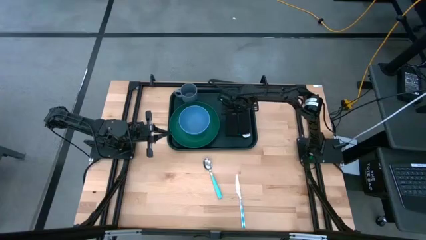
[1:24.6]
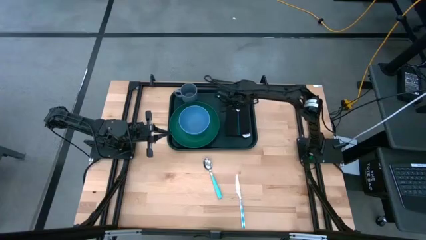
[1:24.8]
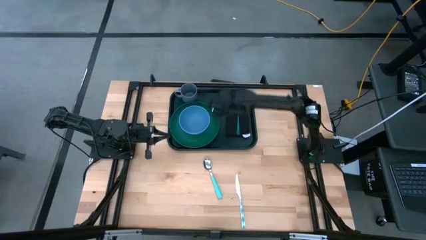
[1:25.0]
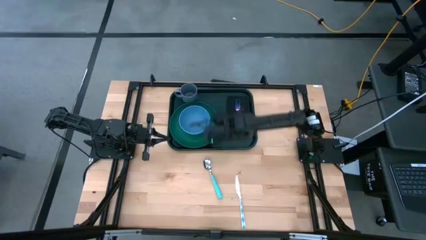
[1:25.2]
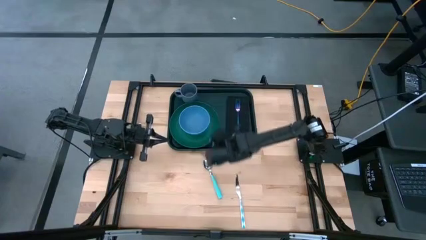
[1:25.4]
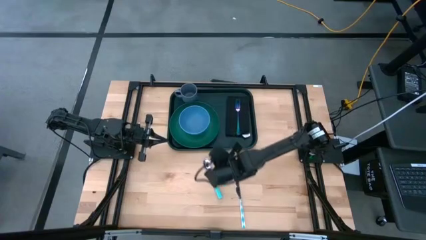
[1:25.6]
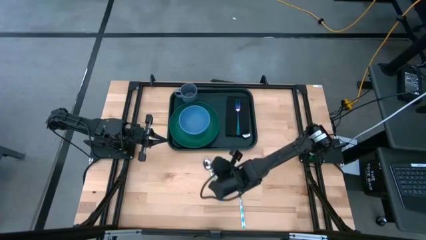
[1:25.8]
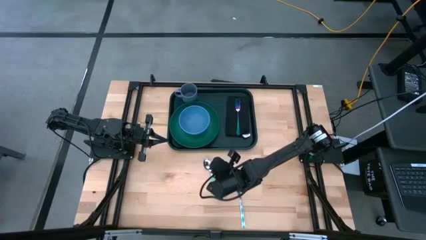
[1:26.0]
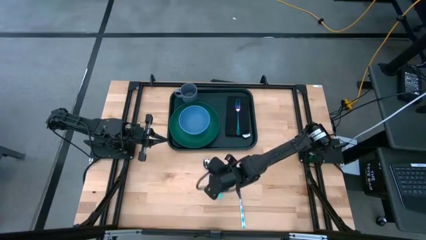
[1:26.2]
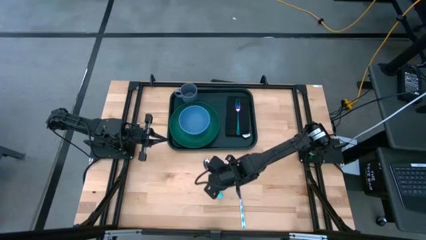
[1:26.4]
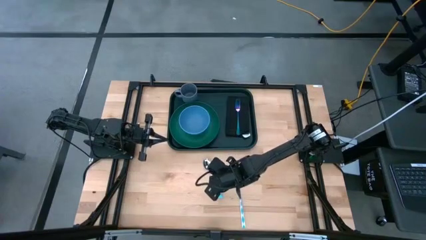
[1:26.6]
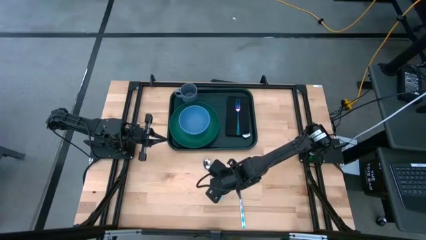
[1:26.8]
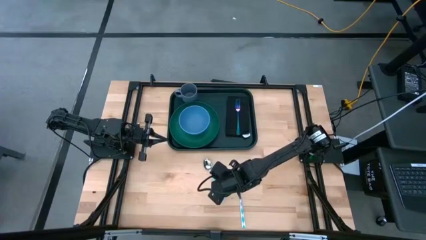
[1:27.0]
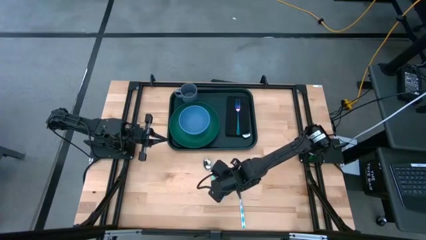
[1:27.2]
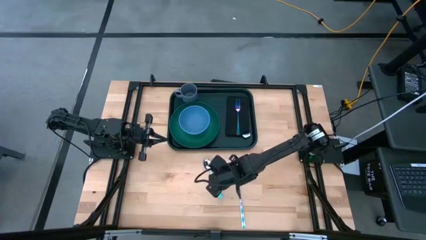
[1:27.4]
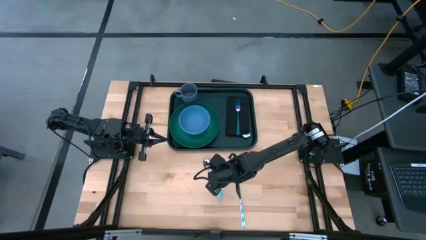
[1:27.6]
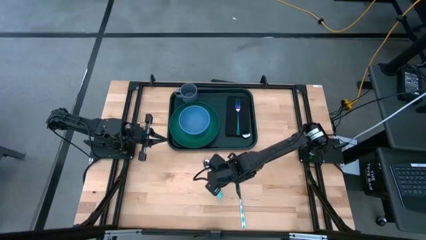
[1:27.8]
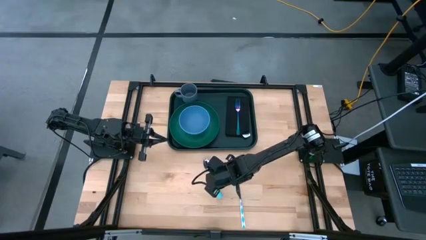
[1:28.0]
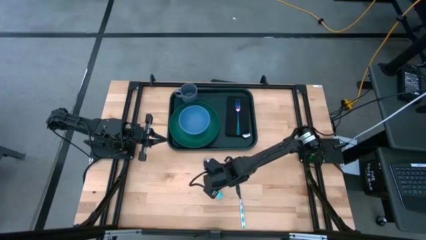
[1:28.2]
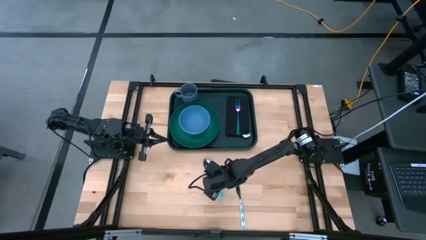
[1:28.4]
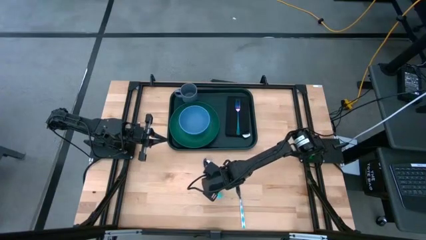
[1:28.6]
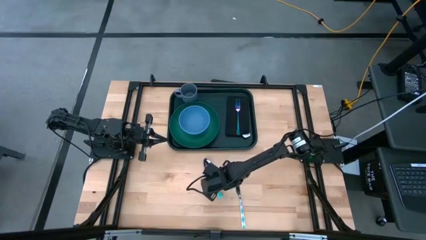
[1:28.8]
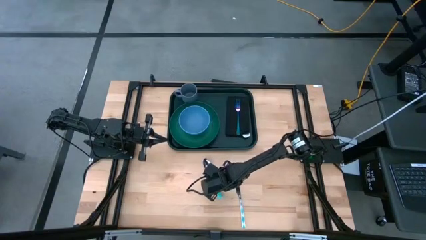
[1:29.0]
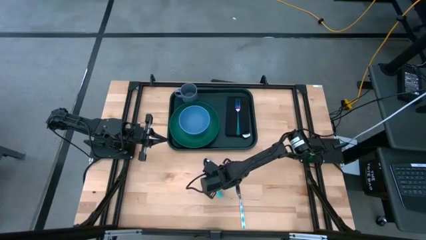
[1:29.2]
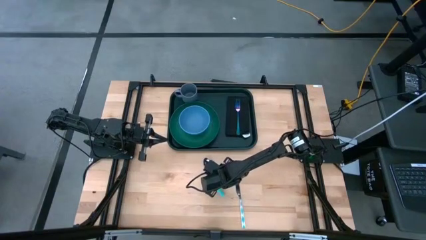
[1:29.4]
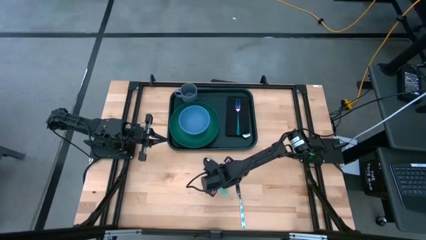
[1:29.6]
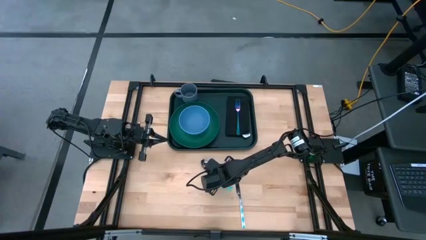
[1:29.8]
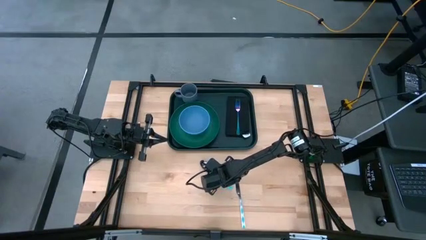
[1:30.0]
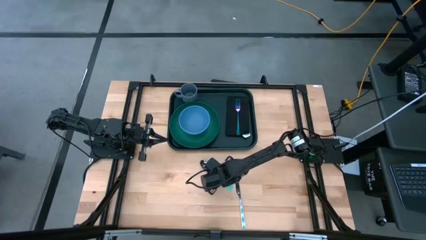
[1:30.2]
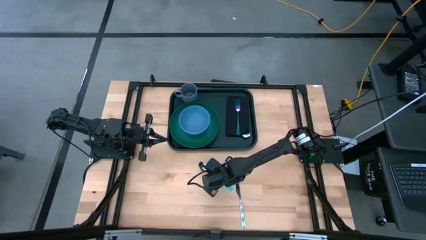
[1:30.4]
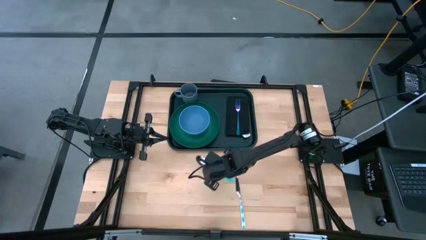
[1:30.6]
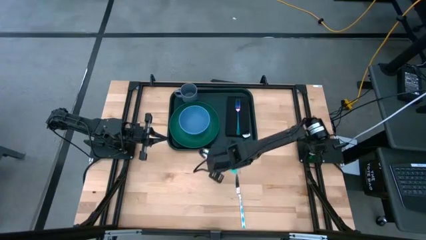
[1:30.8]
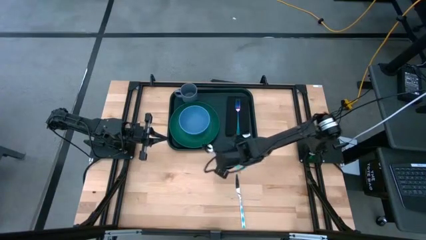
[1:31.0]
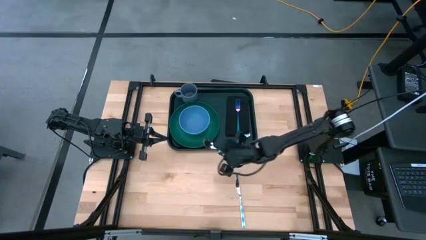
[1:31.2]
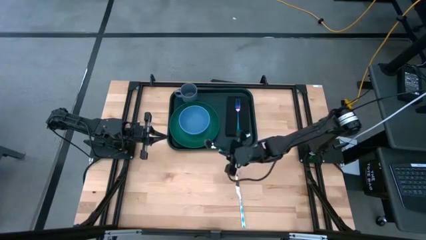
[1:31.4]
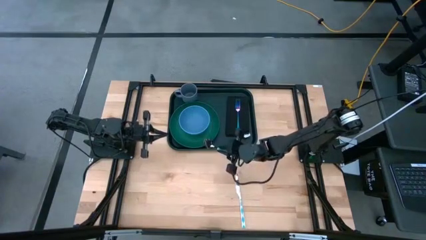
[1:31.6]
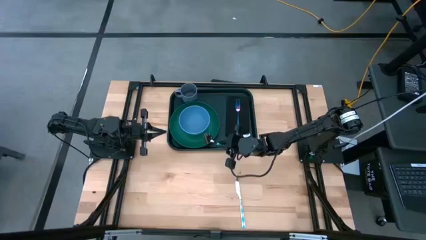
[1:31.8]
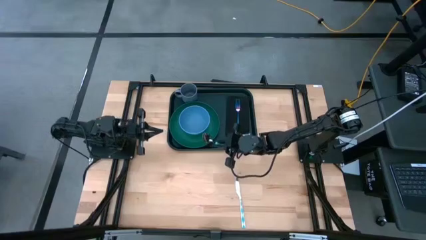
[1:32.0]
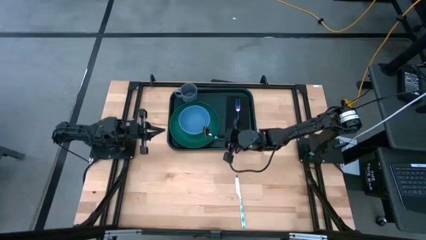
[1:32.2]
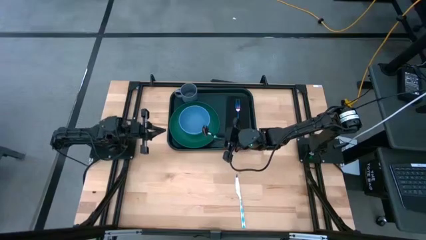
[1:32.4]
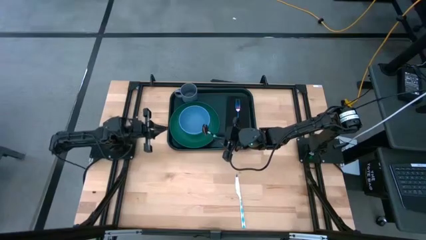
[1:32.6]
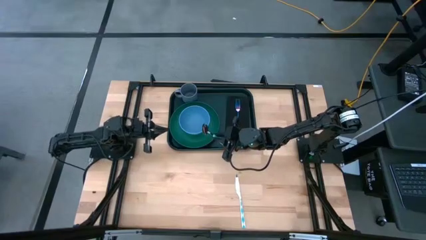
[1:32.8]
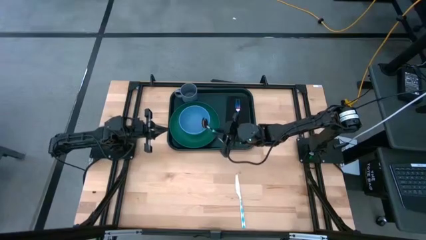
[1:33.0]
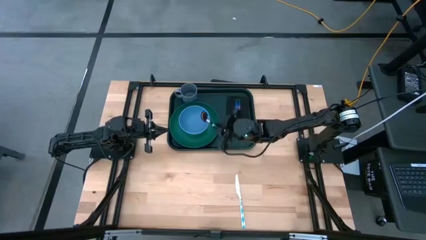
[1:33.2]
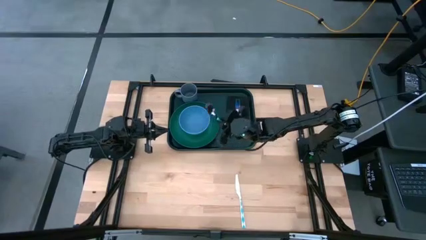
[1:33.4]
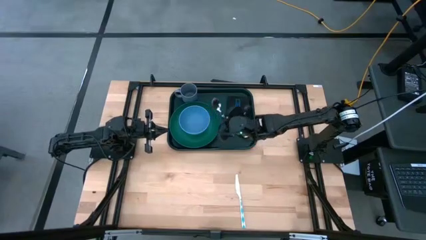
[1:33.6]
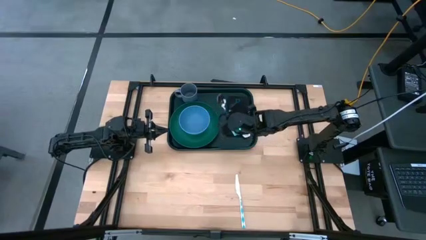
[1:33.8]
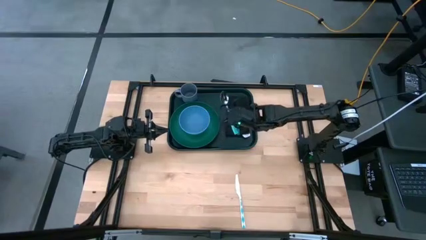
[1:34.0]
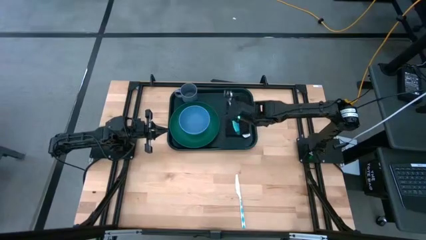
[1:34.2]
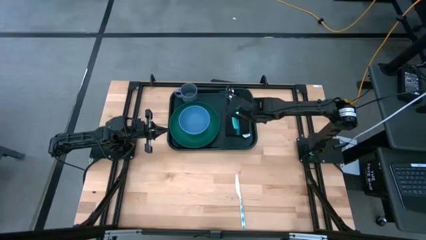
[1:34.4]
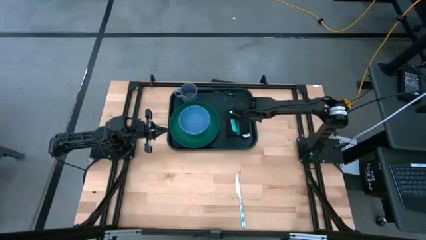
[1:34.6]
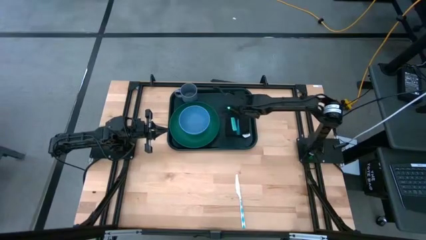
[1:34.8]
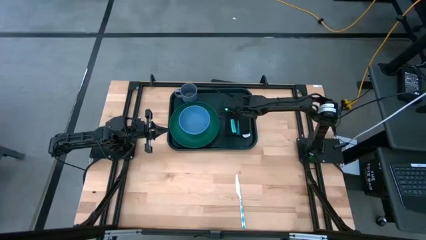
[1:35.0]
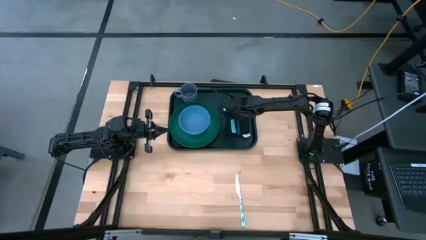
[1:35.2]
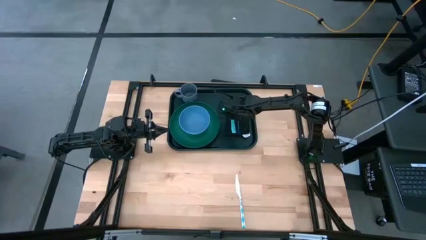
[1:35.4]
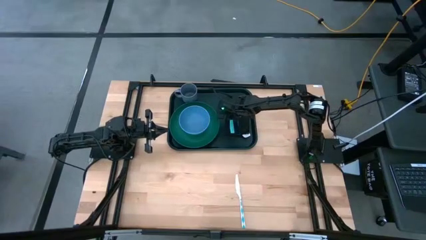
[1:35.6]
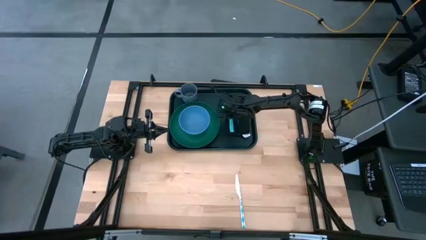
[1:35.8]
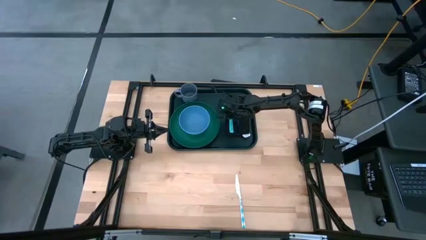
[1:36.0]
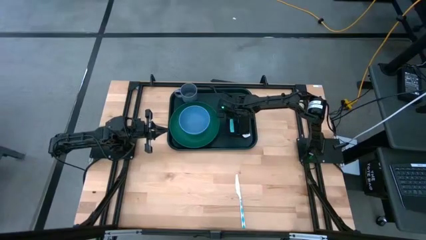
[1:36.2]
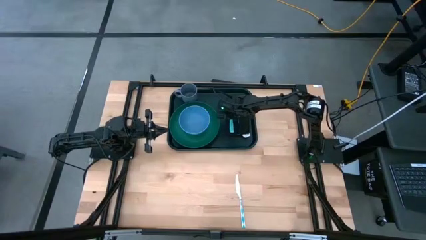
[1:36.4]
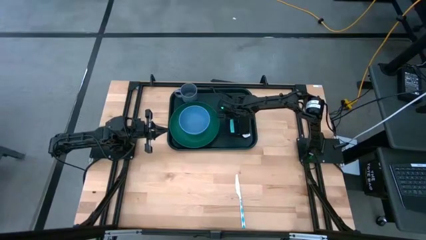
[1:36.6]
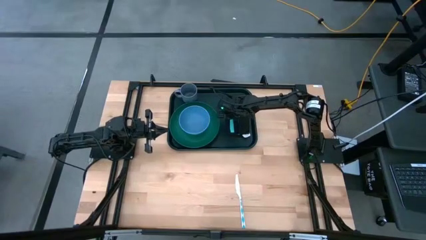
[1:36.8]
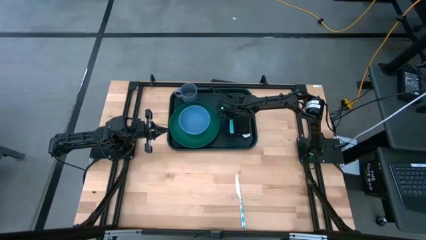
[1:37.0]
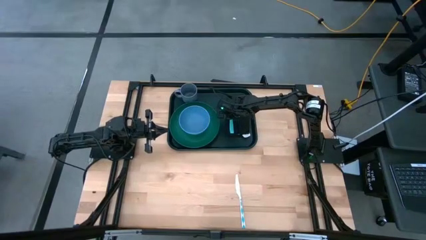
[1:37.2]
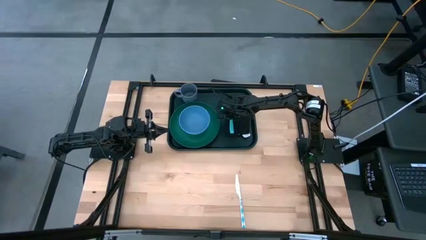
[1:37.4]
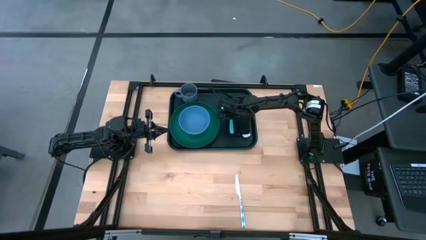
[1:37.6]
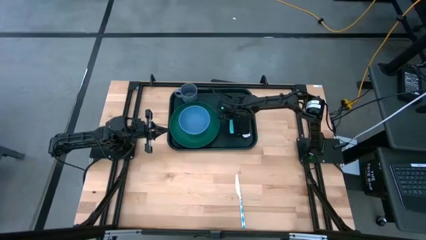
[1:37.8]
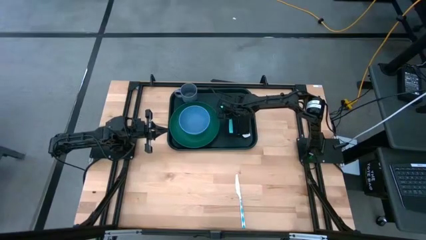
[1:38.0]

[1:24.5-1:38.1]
Task: Set up tray
Put the light blue spoon to the left of the blue fork on the black napkin

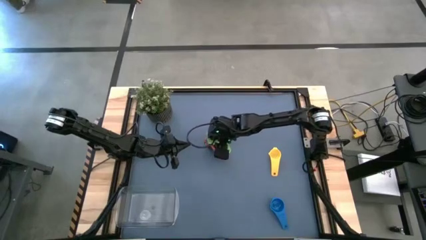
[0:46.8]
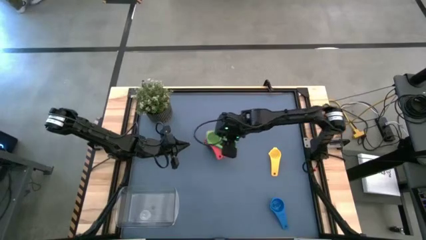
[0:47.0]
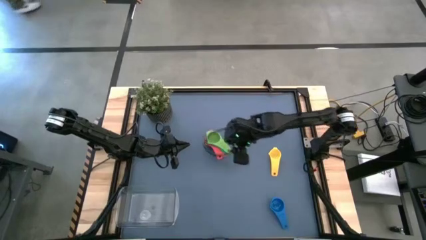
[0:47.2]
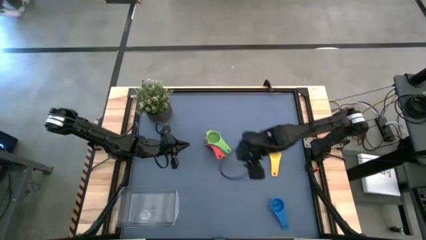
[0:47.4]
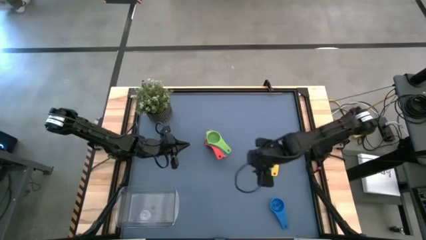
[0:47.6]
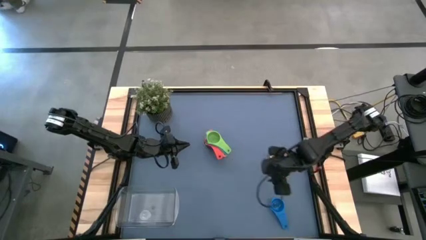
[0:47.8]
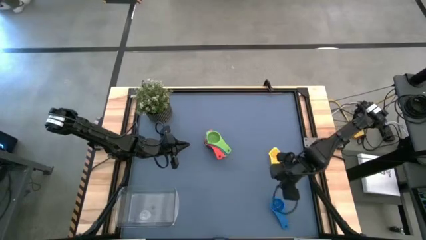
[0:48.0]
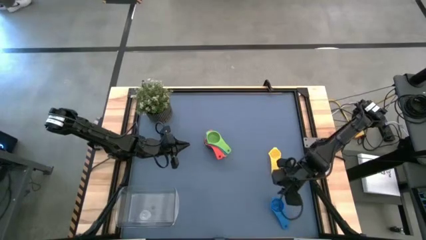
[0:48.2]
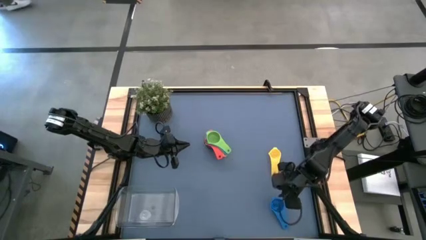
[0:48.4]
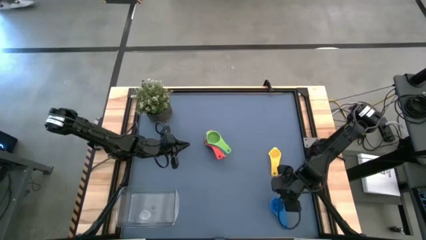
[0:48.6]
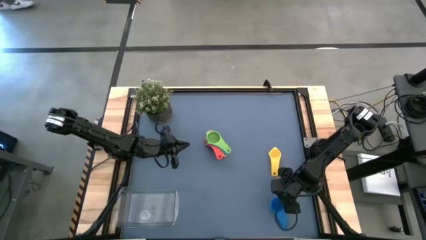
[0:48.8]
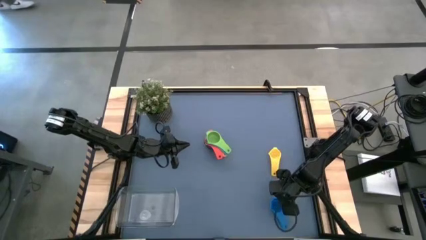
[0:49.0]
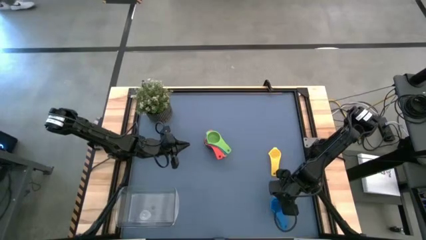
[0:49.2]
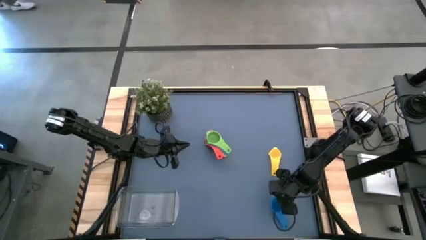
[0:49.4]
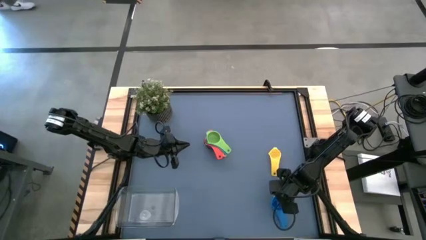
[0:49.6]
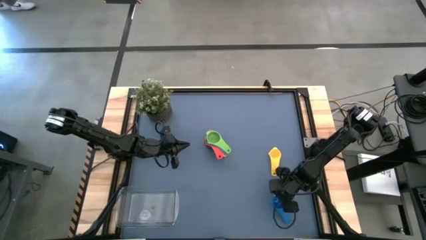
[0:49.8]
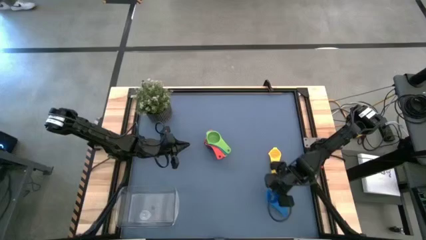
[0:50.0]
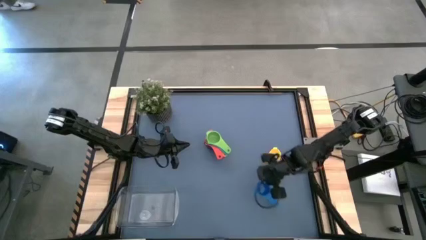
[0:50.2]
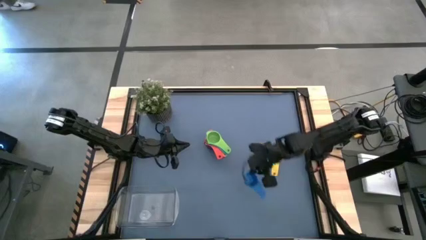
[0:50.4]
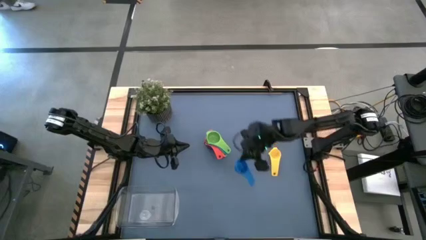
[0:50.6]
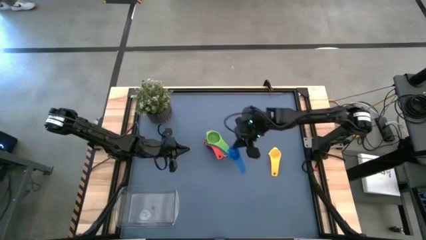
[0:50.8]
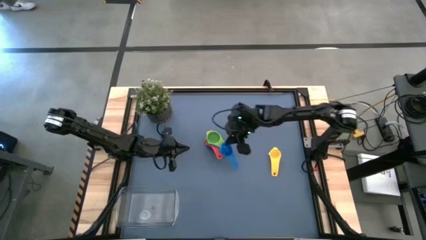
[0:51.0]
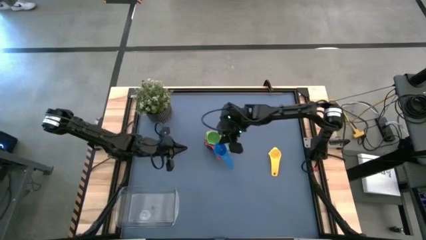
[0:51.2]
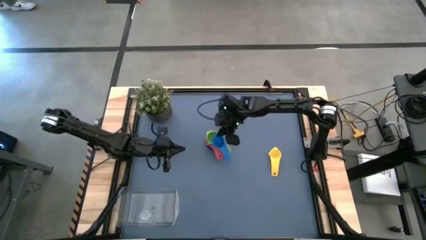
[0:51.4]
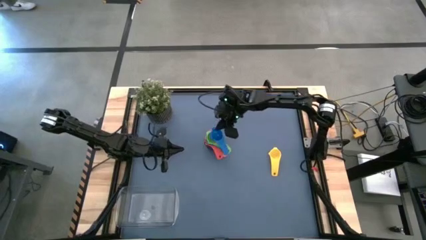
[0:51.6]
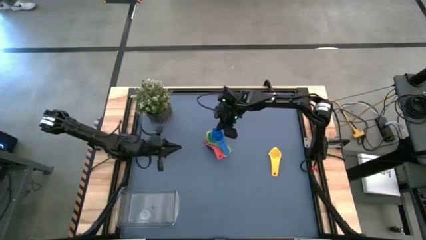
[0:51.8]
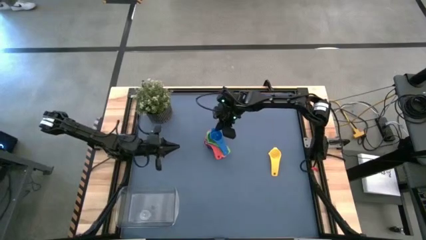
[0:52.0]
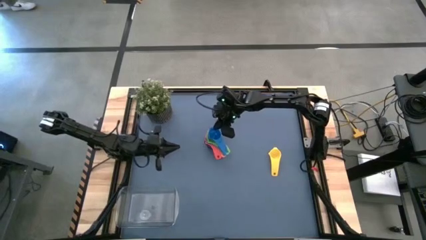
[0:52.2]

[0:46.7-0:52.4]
Task: Nest measuring cups in basket
Stack the blue measuring cup on top of the green measuring cup
